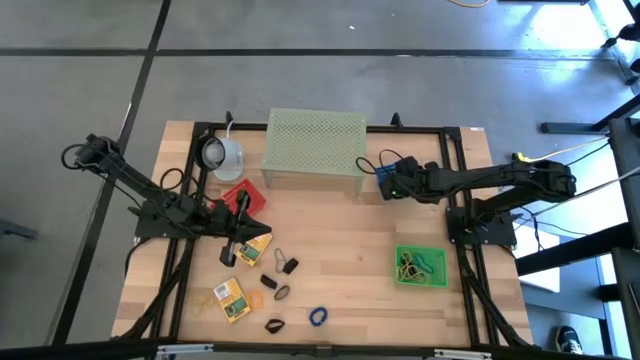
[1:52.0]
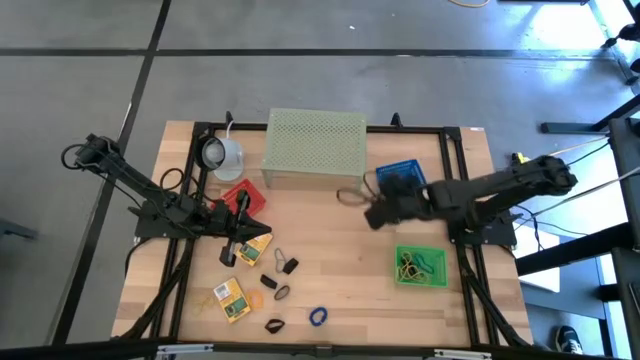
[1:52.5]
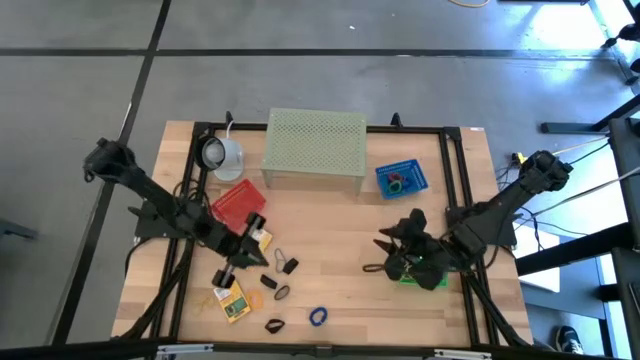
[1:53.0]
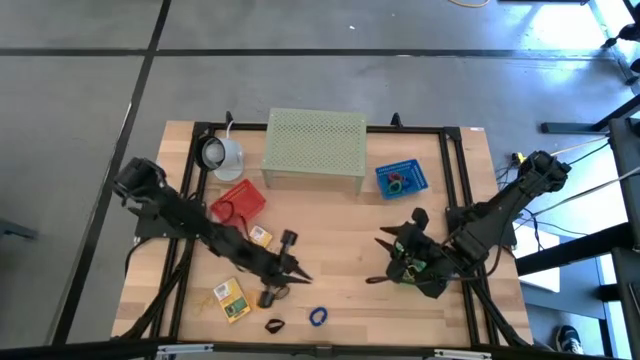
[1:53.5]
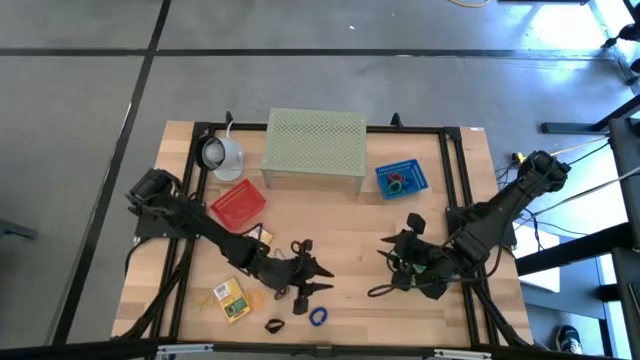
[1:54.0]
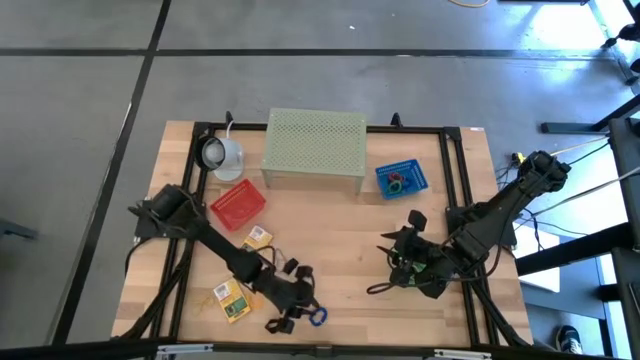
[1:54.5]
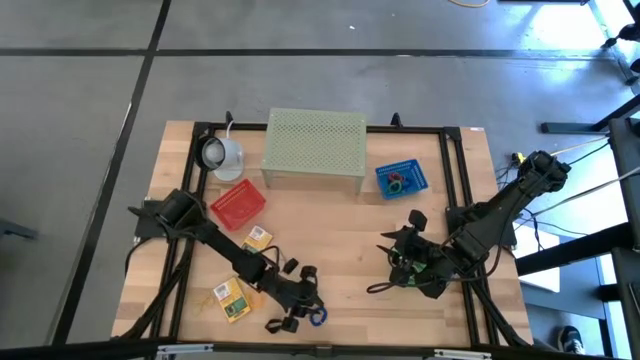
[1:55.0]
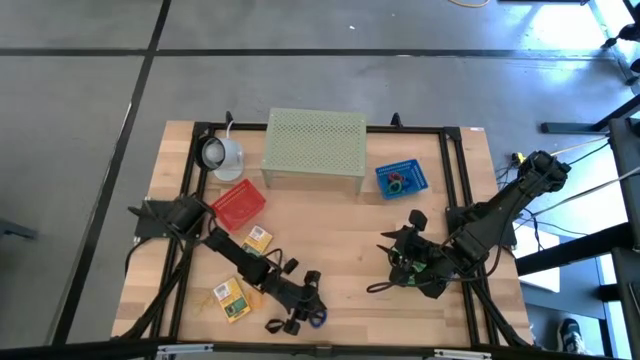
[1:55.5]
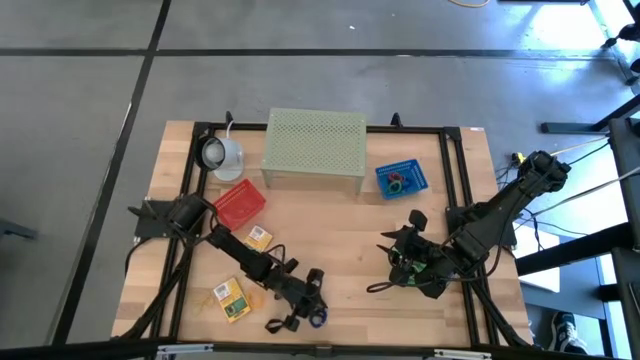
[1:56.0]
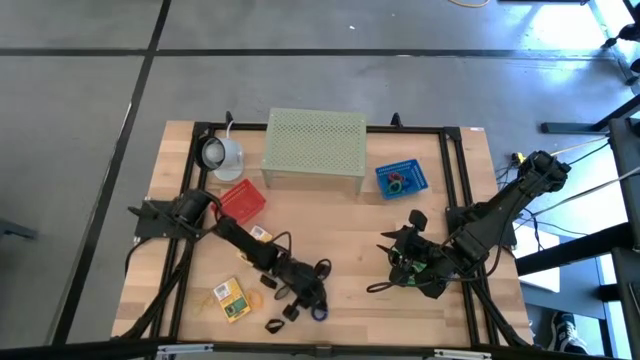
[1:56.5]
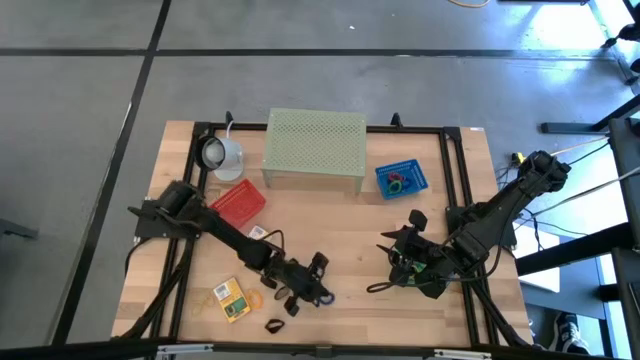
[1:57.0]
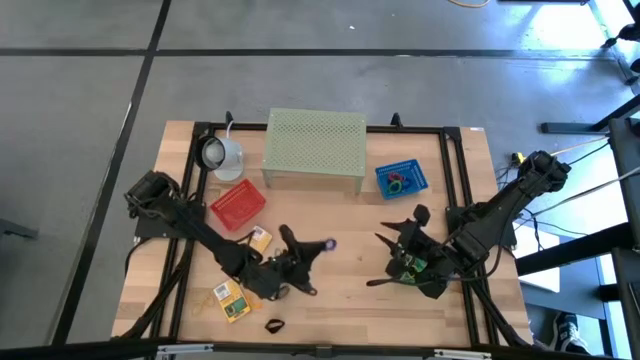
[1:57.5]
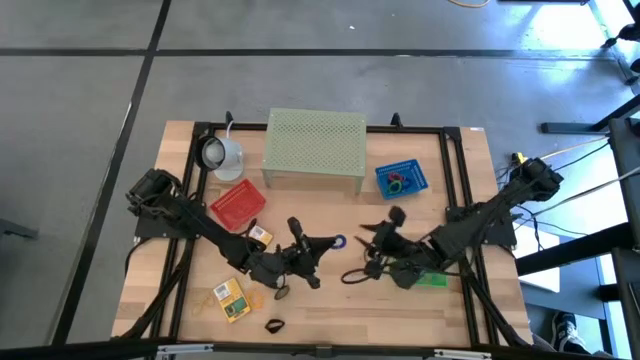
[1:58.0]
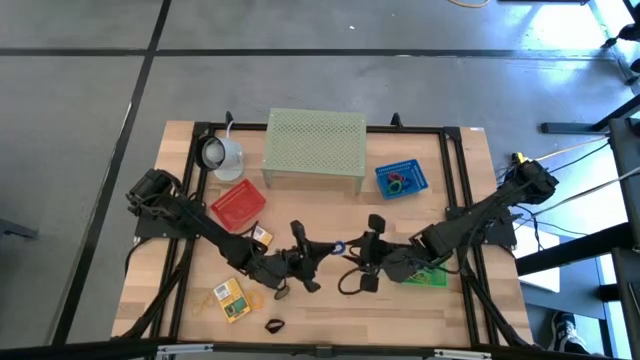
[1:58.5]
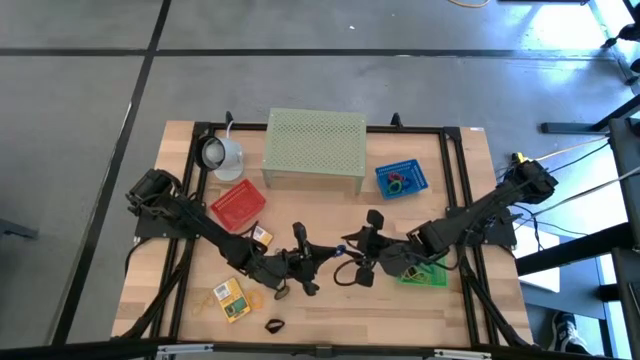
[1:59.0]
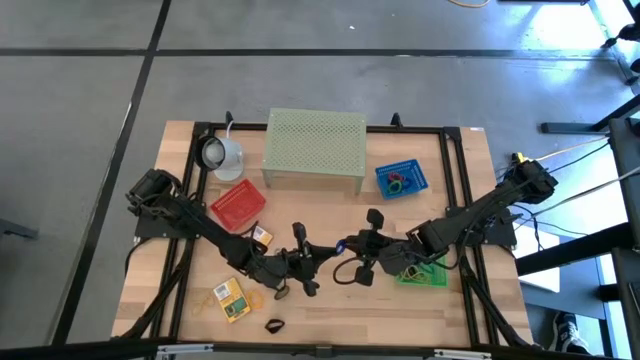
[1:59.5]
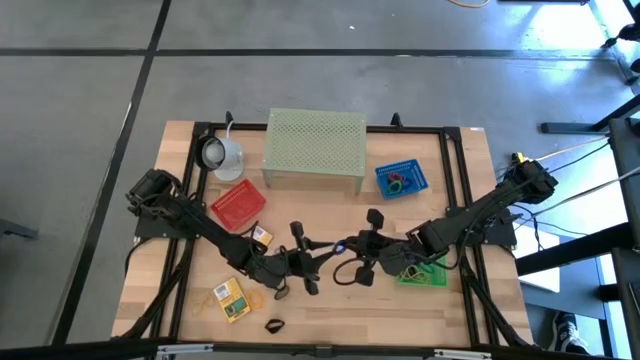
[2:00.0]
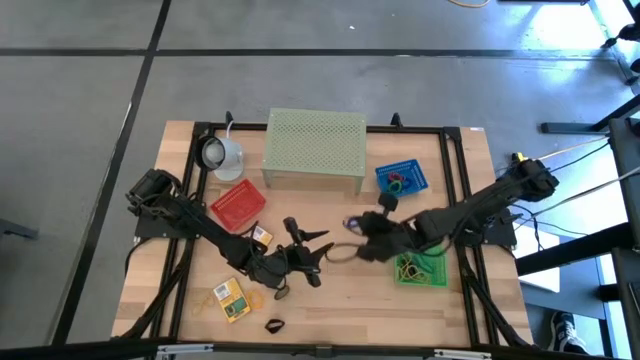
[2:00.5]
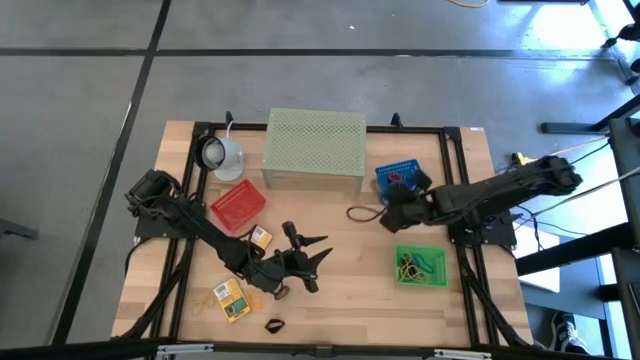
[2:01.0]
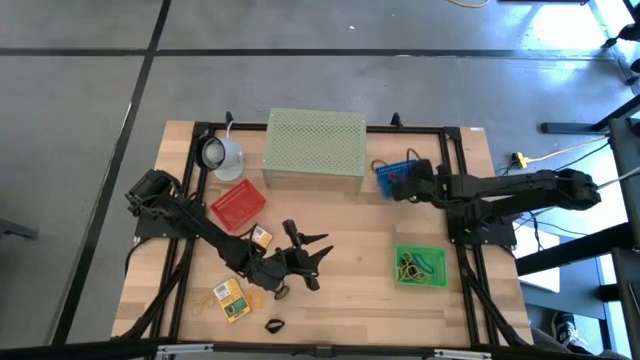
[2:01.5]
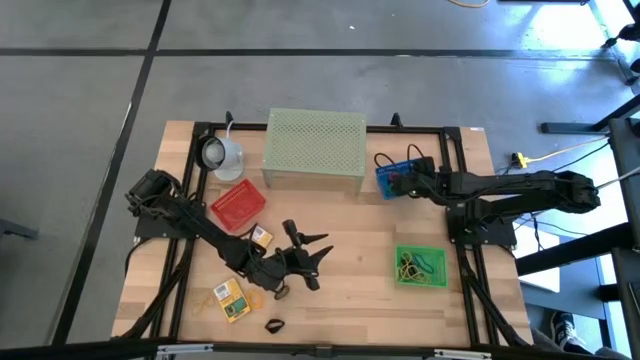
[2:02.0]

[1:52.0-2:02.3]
Task: Pick & Place Office Desk Supplies
Put the blue spring keychain into the blue bin

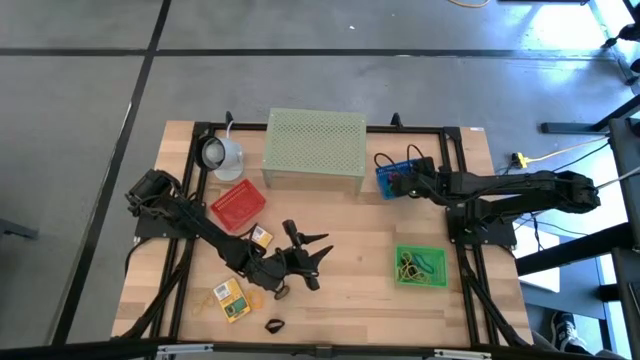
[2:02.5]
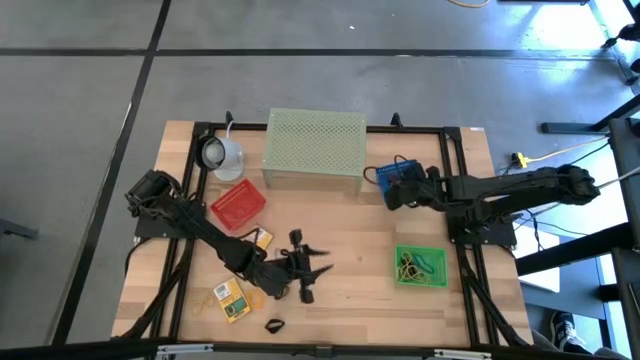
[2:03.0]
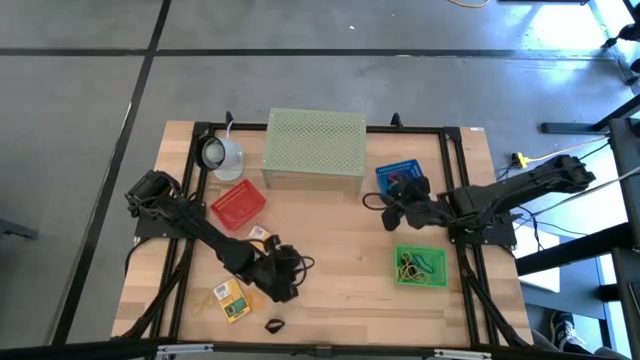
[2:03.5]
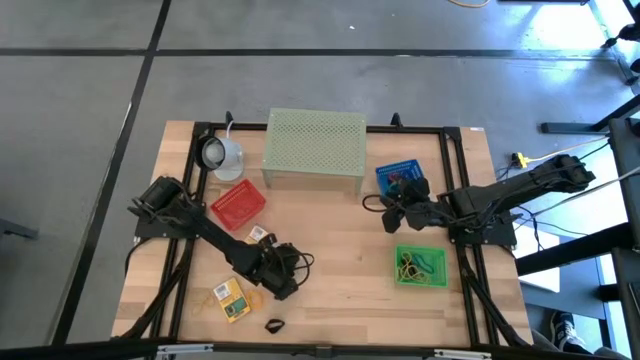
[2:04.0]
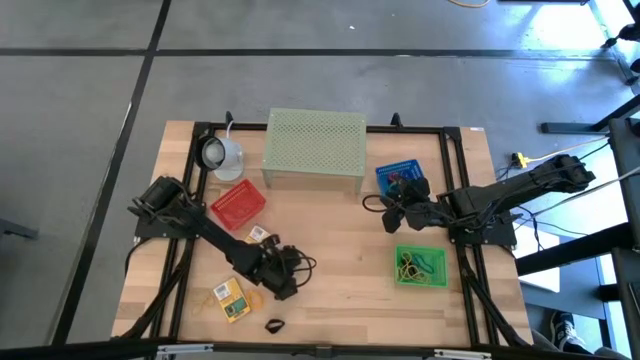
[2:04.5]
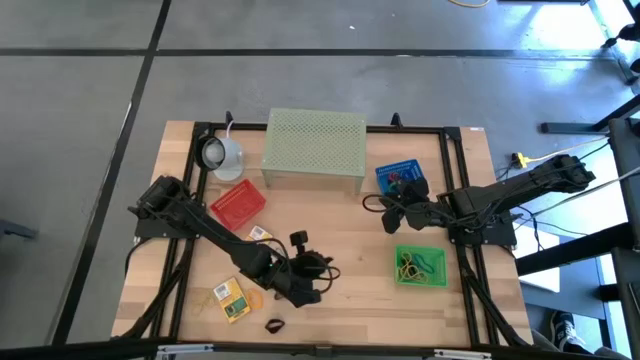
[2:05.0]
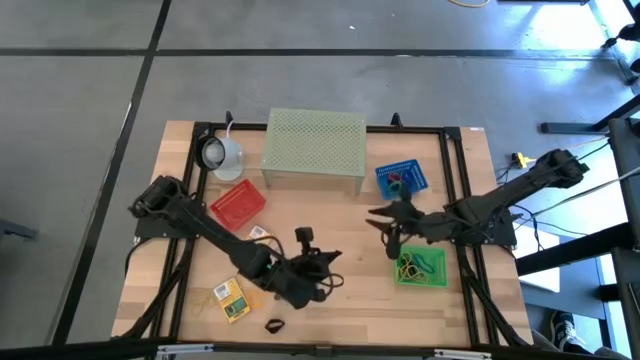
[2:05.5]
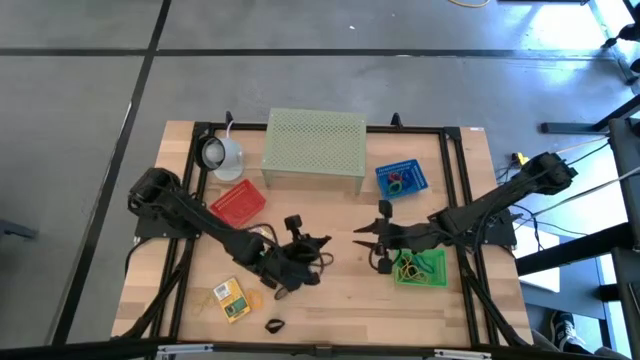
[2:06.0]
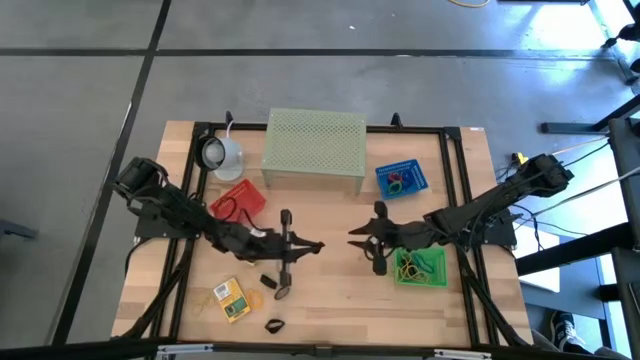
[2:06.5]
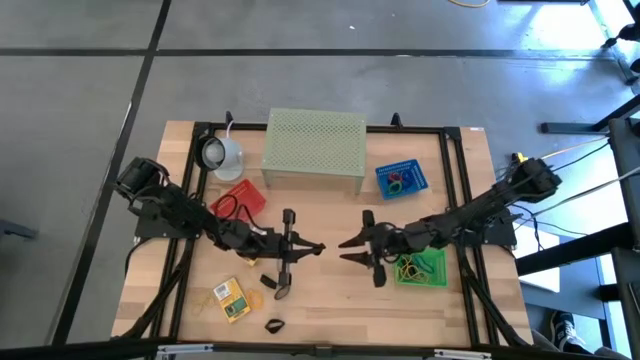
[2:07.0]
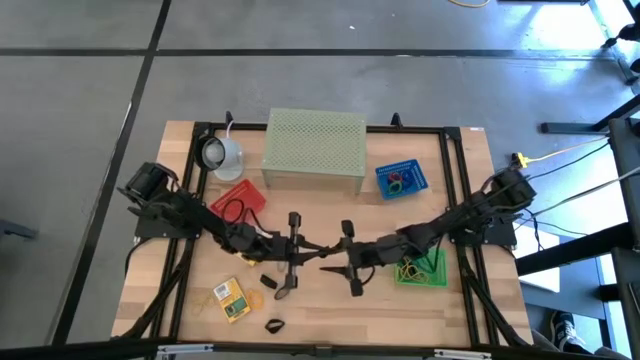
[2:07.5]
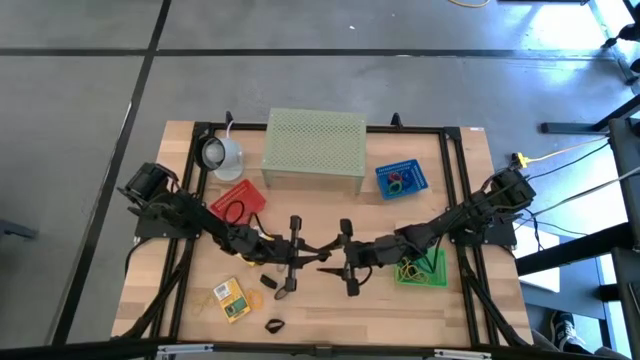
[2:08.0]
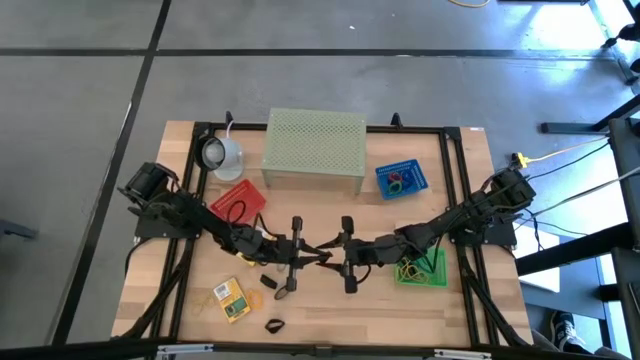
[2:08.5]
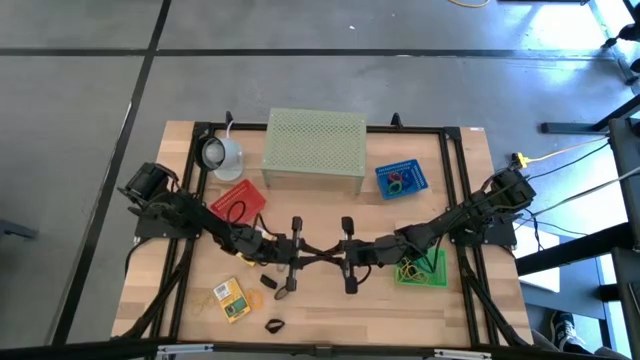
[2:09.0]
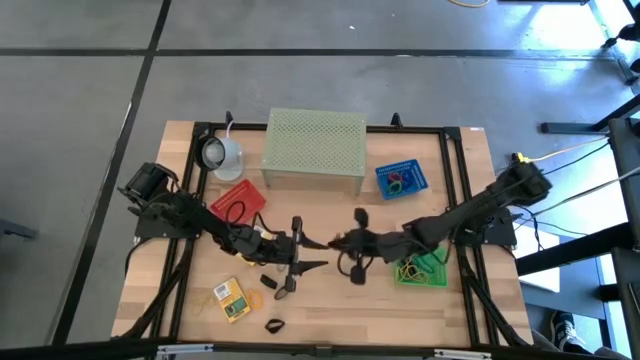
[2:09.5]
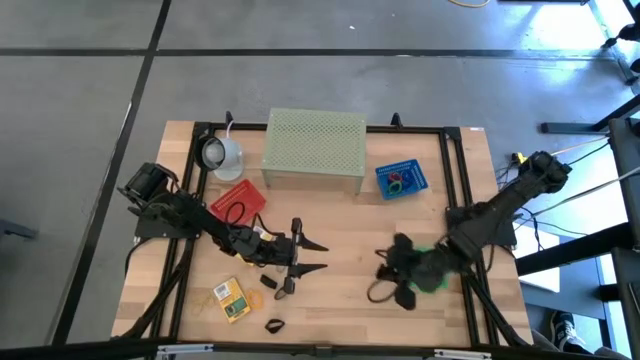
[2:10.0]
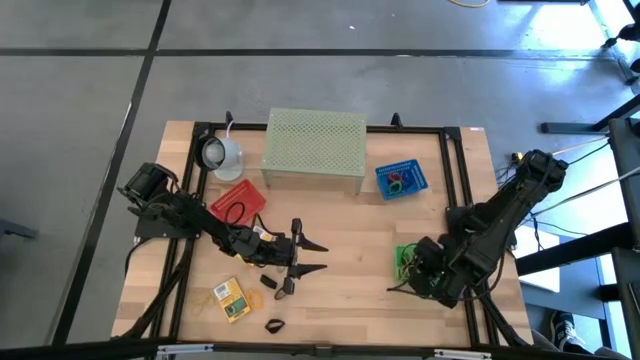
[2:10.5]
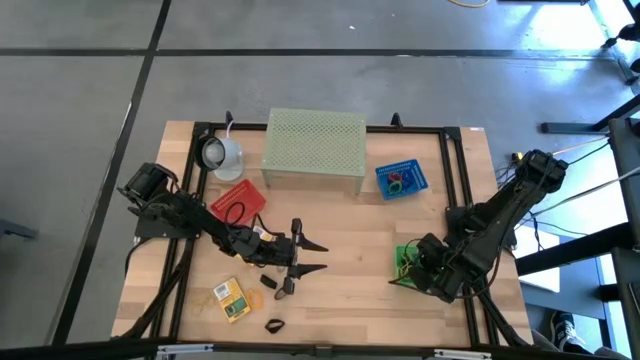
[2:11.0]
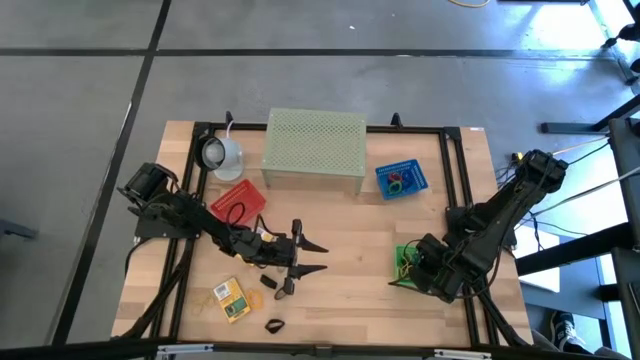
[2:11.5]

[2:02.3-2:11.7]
Put the black rubber band into the green bin
